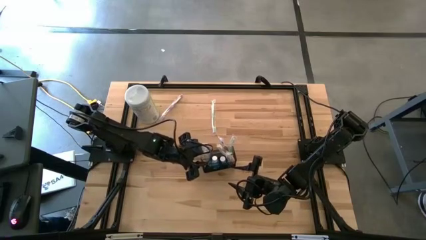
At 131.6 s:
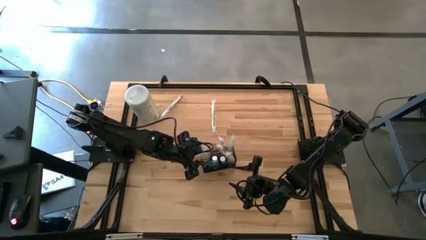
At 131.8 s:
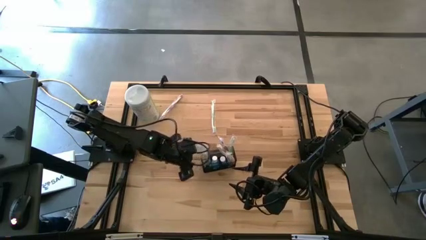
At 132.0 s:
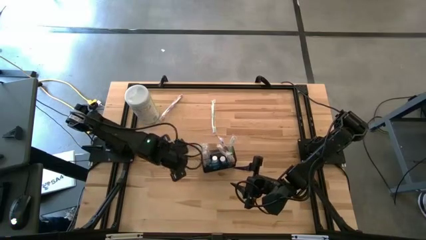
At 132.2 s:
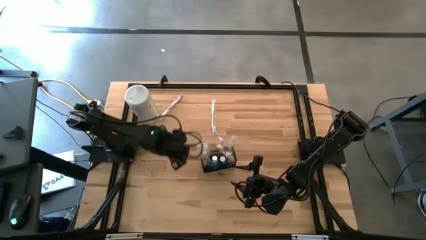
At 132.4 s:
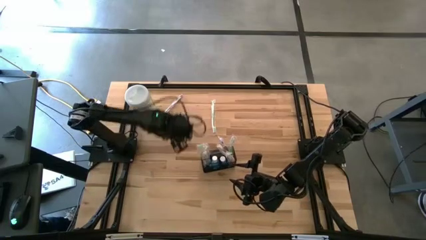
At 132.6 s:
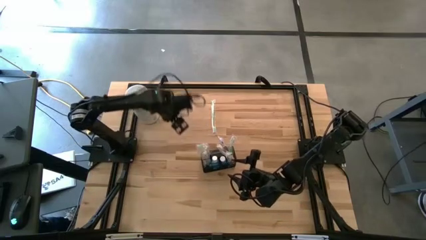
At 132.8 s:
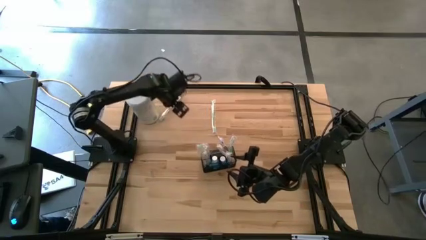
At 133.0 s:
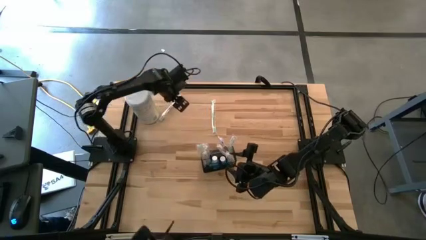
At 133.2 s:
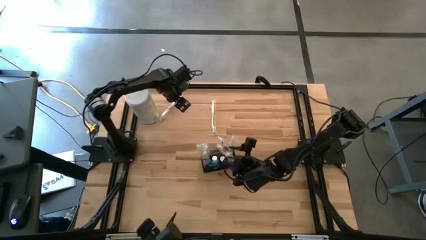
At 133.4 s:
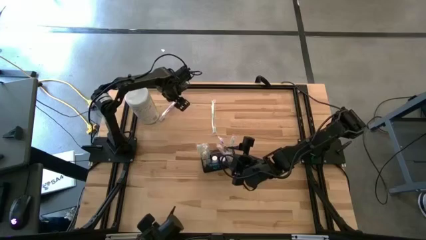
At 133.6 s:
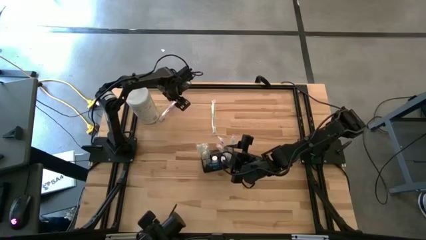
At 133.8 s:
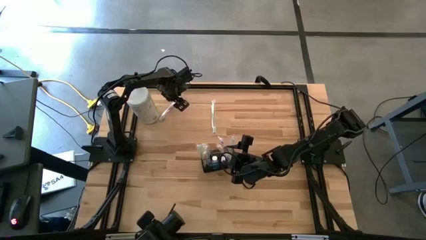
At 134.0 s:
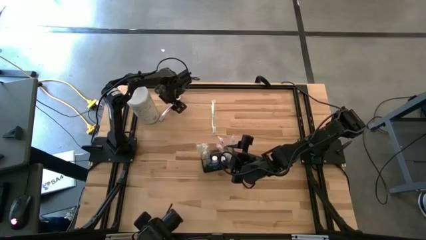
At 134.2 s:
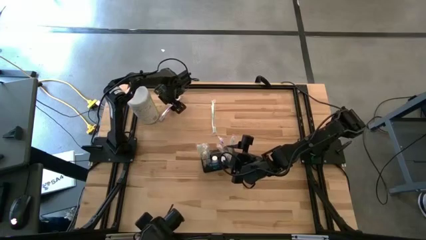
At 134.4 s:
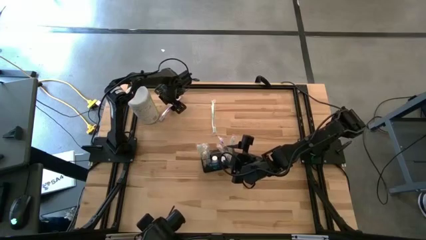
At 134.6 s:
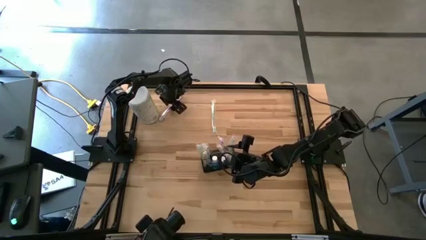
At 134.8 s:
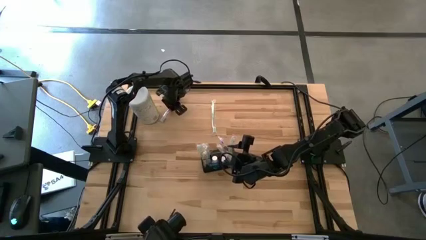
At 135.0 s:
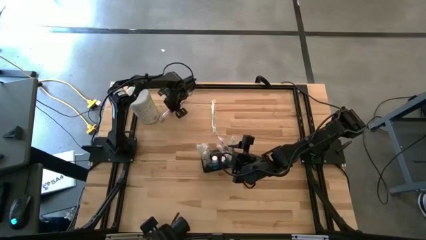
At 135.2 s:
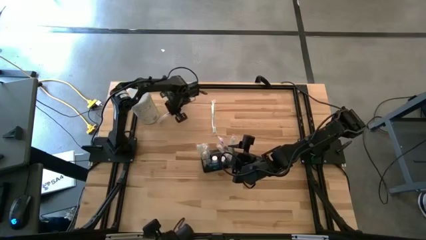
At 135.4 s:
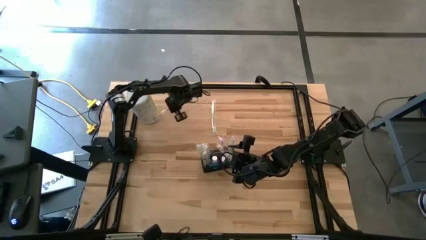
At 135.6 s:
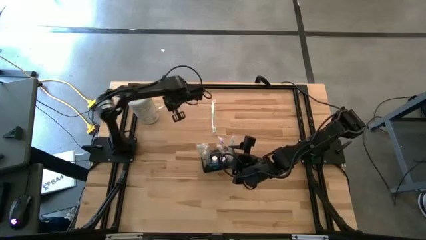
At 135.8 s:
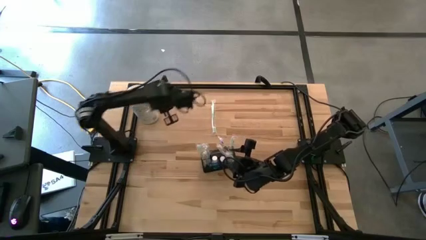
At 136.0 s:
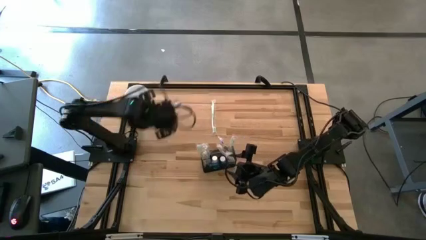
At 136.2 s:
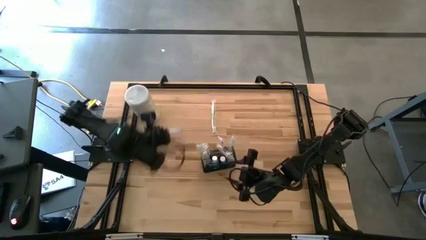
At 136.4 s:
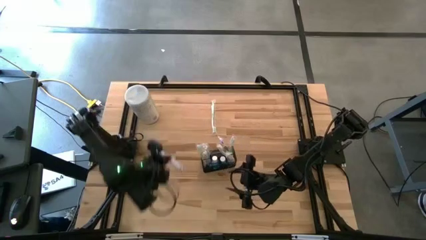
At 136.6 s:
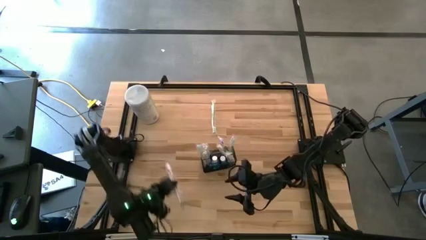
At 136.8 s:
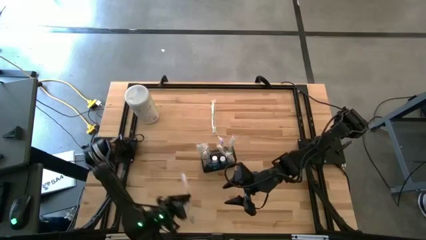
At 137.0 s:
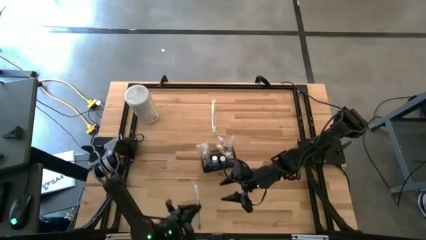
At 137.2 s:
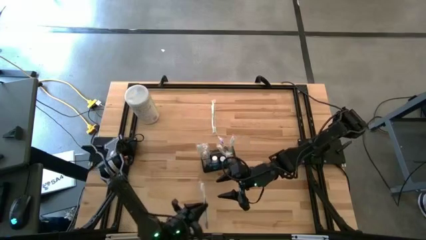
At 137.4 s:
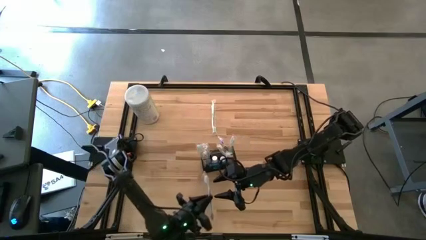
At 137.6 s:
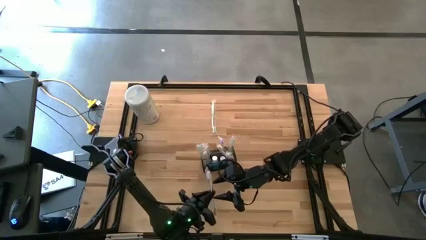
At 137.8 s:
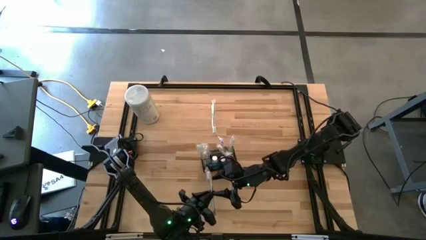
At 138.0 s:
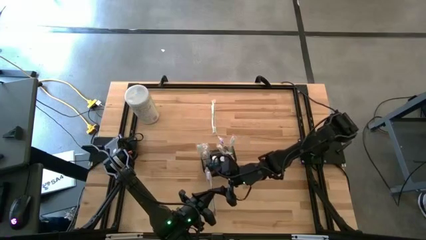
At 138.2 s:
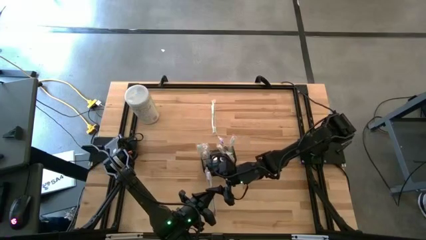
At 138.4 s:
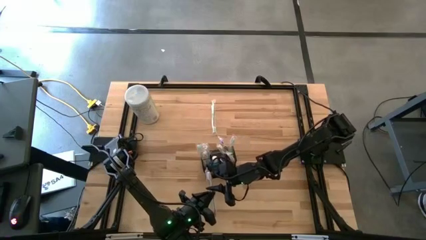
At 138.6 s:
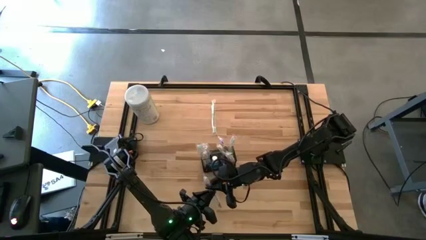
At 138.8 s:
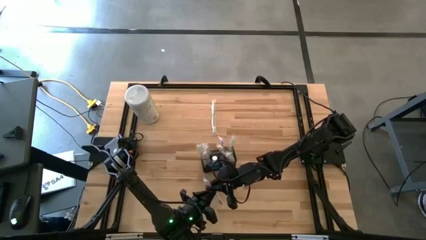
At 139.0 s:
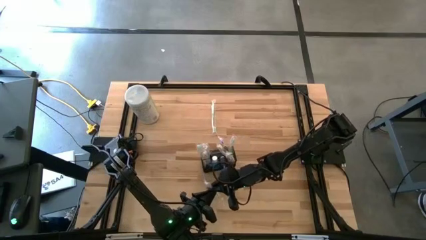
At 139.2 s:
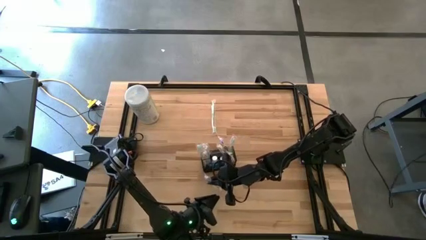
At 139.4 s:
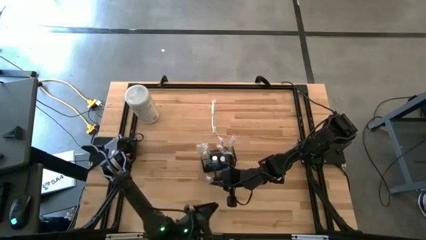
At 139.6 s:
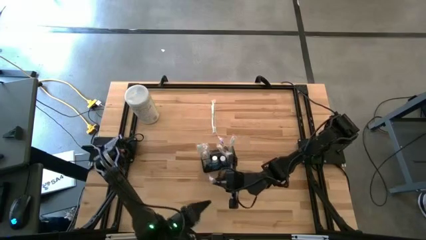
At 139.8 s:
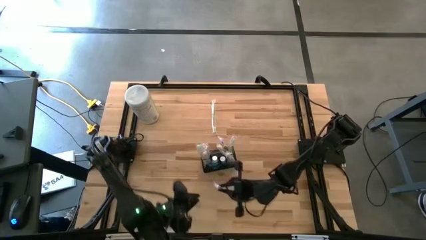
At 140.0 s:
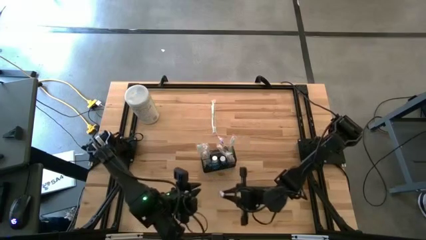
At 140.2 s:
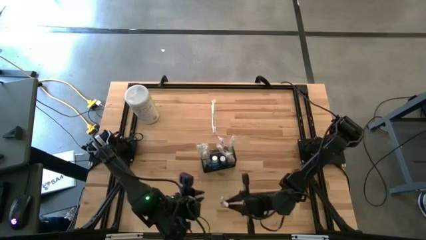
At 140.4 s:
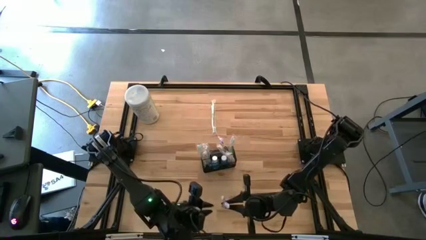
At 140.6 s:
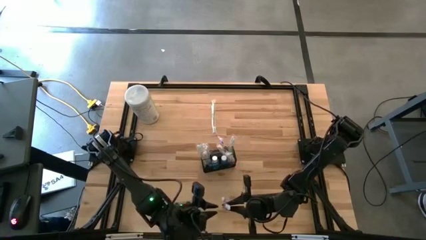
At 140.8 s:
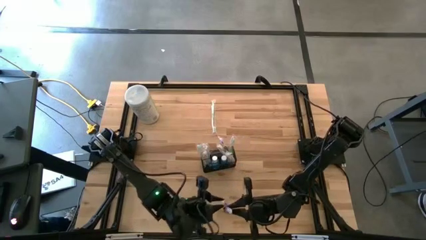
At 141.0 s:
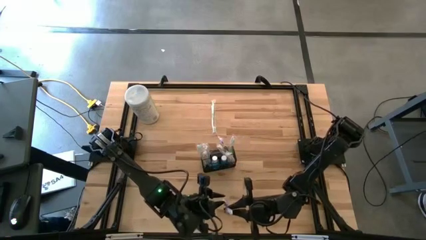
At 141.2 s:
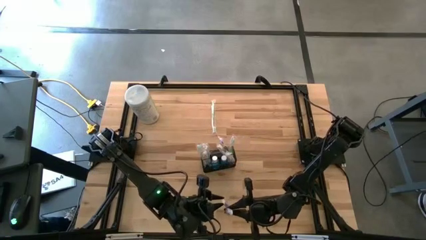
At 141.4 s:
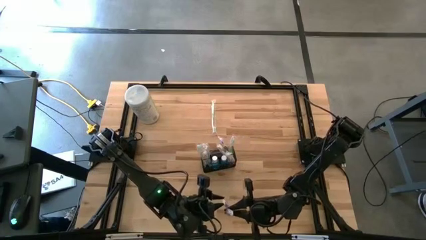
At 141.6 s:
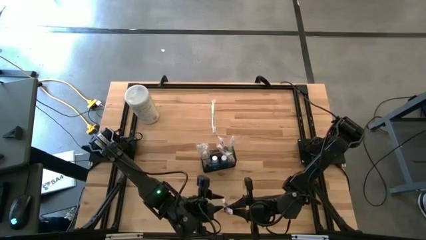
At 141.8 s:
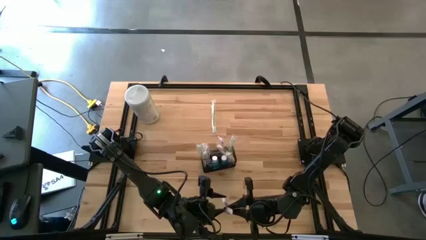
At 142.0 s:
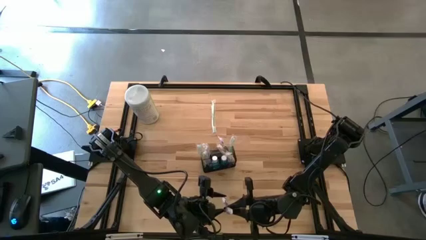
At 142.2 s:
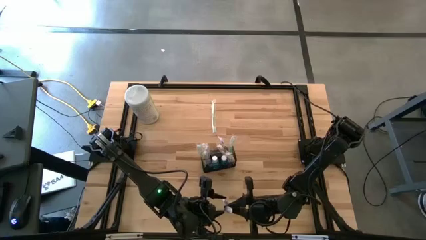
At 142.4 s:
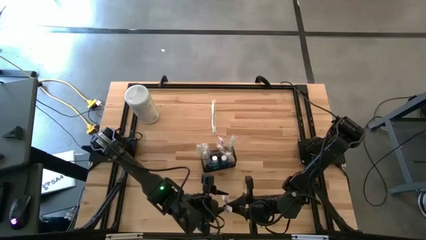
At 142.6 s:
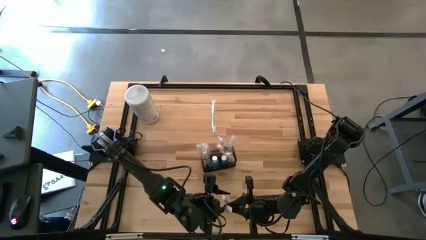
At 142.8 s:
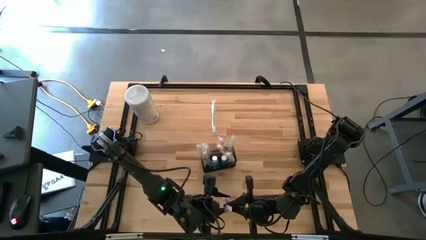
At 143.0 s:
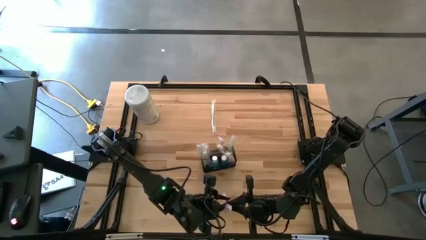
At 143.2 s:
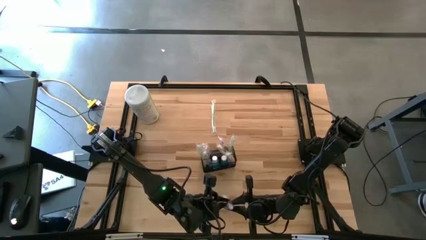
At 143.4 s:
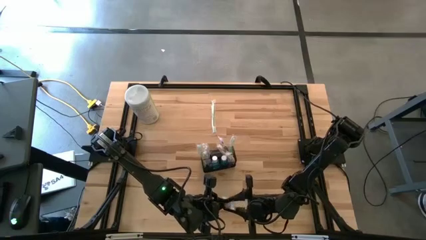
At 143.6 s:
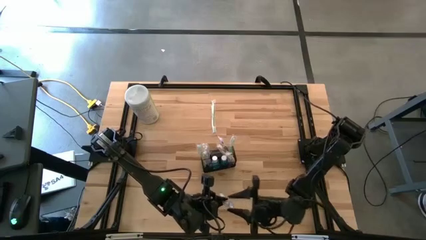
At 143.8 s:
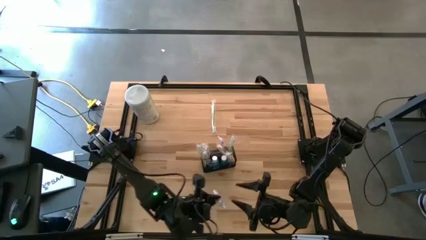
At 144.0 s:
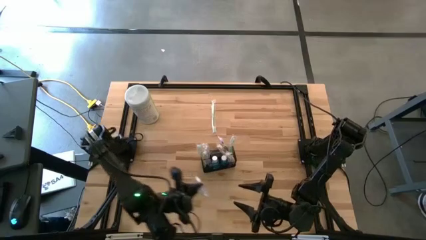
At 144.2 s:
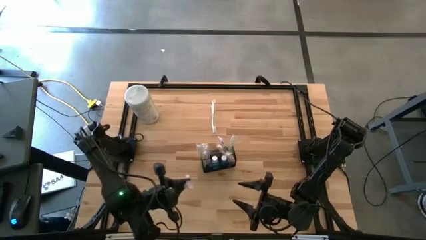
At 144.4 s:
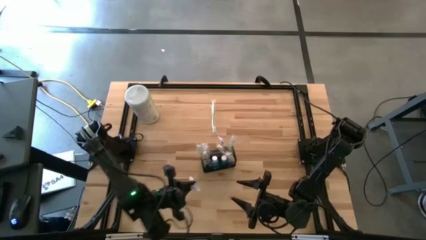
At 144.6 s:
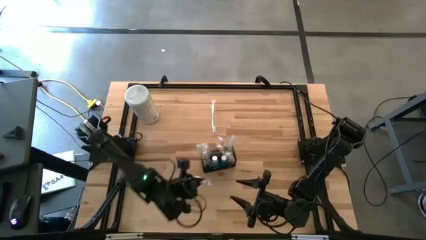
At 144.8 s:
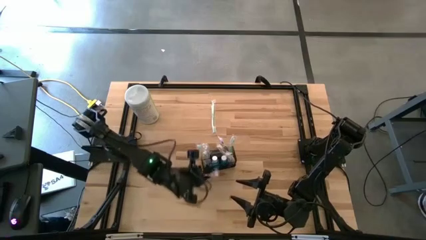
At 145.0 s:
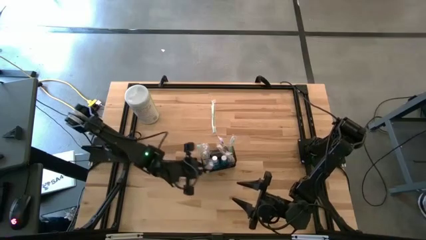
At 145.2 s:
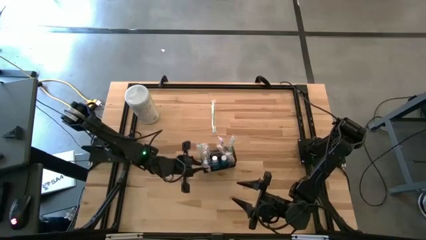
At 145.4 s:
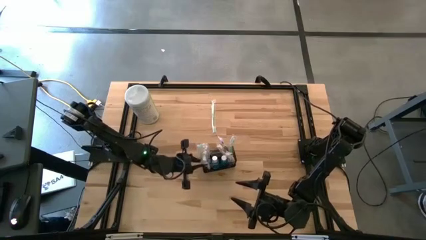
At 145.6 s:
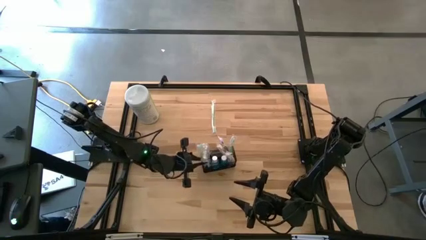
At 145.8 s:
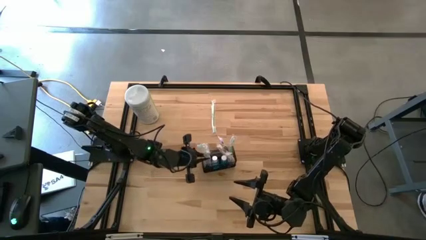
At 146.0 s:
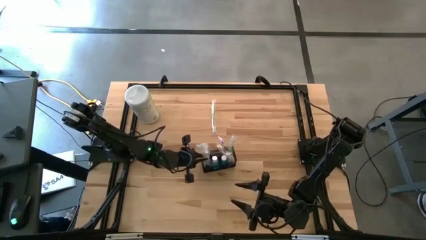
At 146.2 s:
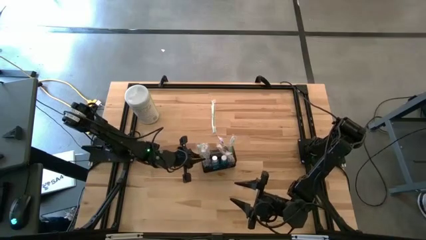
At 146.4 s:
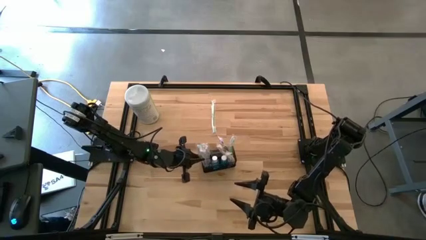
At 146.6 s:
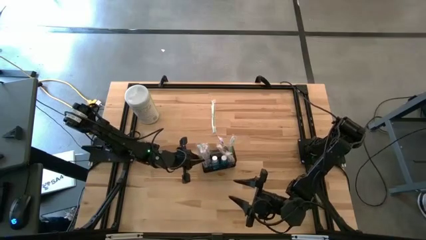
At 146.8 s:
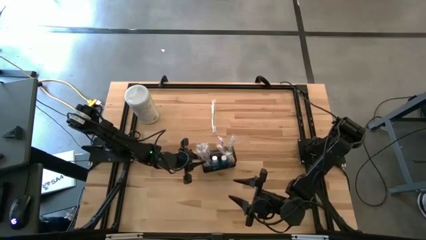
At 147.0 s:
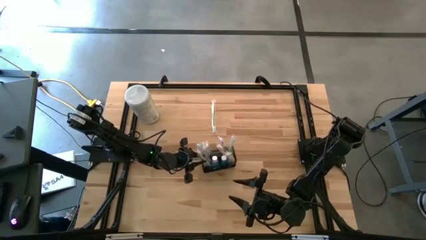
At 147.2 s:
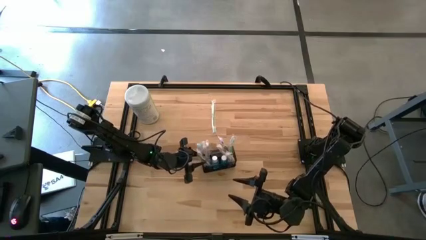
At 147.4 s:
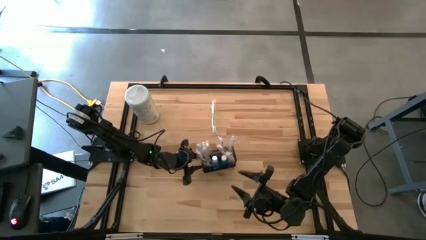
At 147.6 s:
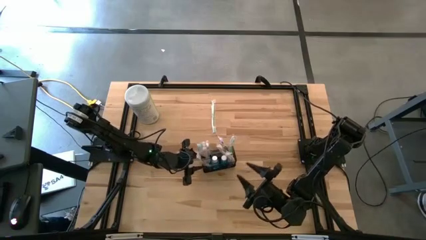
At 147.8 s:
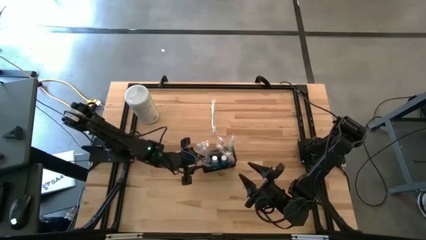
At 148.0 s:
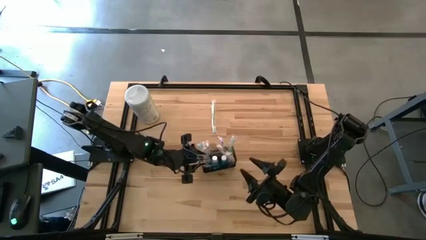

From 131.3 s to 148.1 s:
Task: Pick & Place toothbrushing station
Put the purple toothbrush into the black wire organizer
